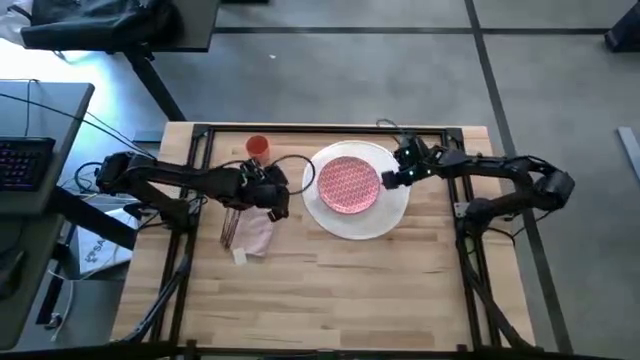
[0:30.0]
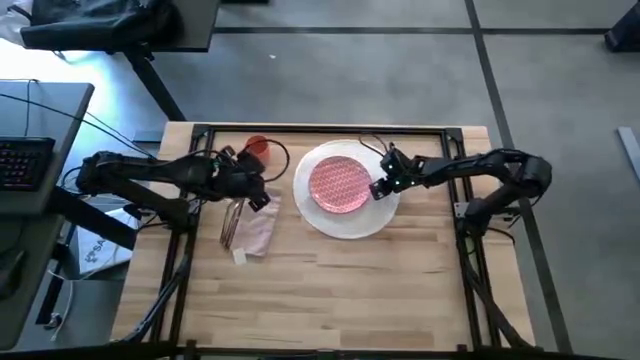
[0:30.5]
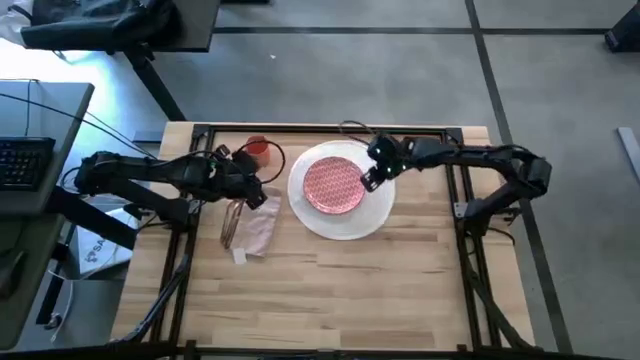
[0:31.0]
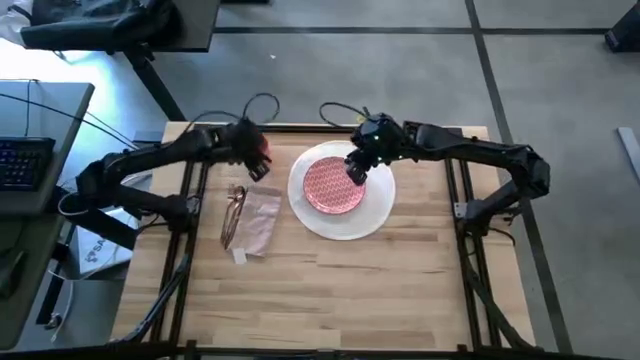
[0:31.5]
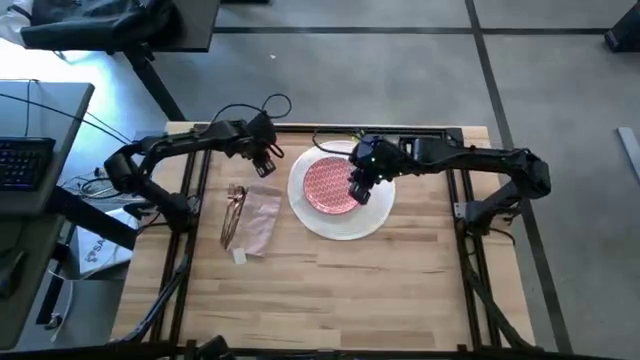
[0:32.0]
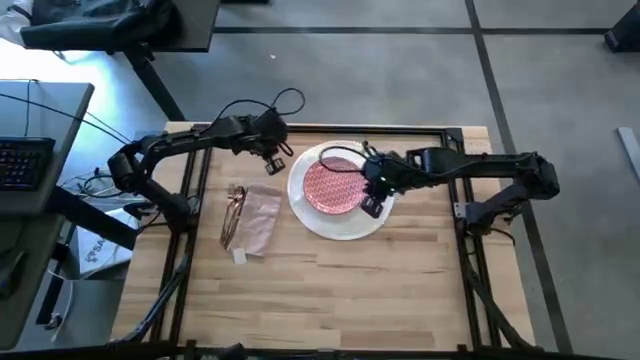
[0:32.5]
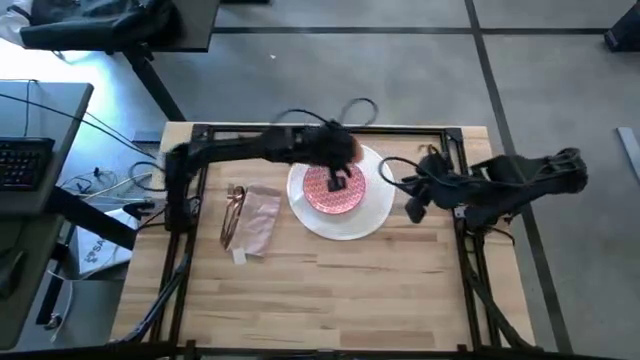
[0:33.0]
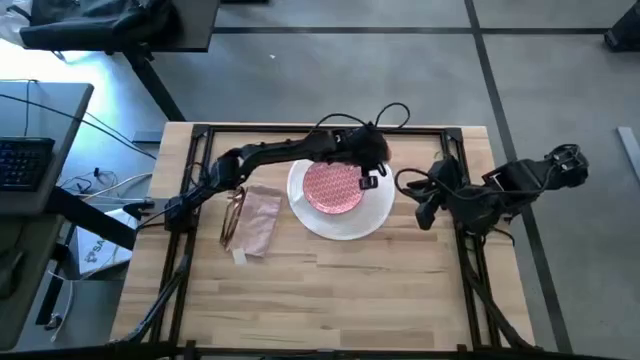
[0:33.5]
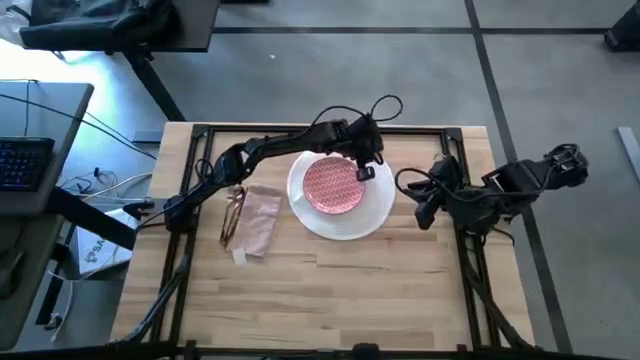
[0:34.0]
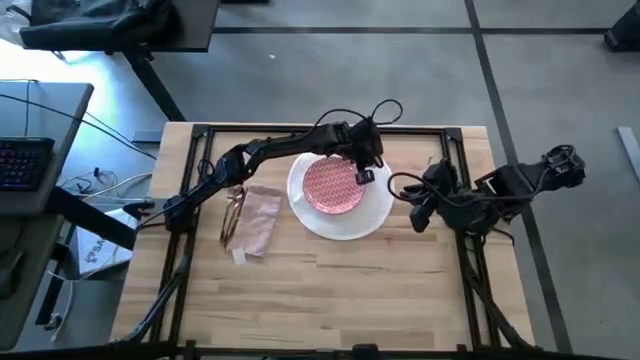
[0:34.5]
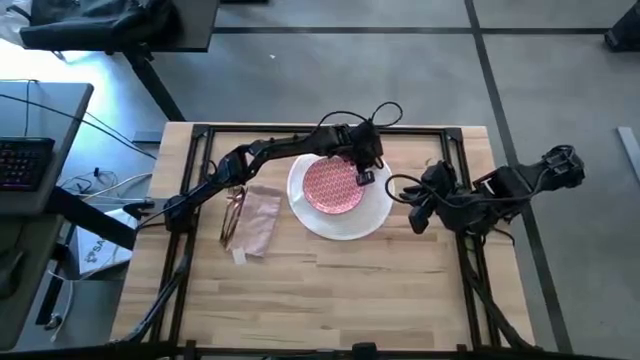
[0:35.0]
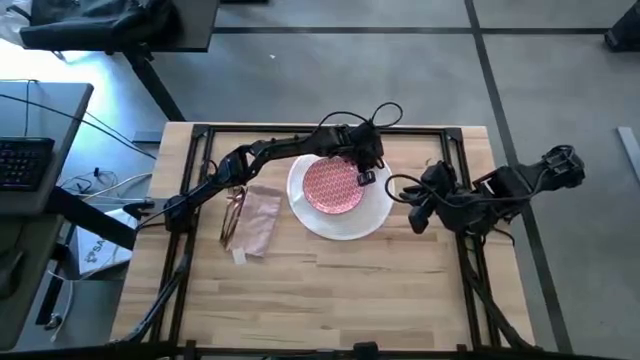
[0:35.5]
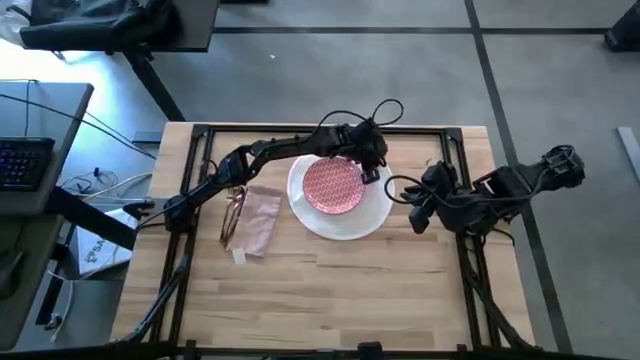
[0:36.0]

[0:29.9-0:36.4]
Task: Set table place
Put the cup onto the placemat

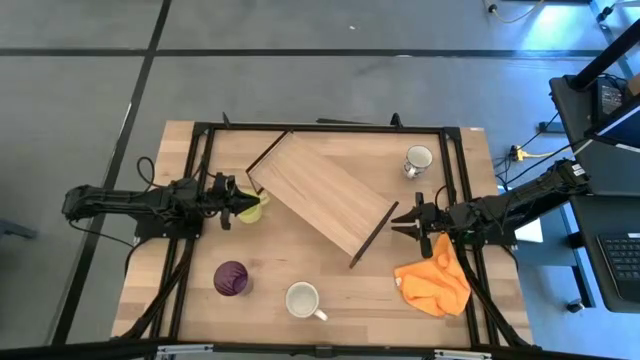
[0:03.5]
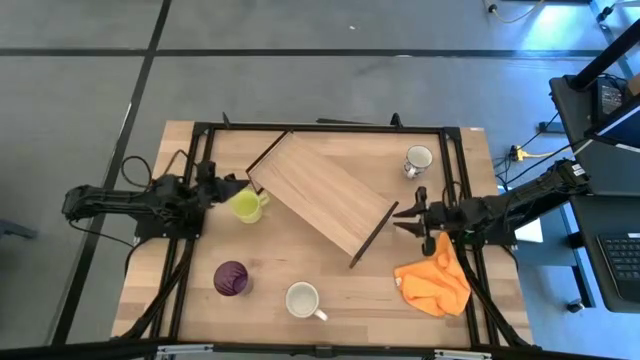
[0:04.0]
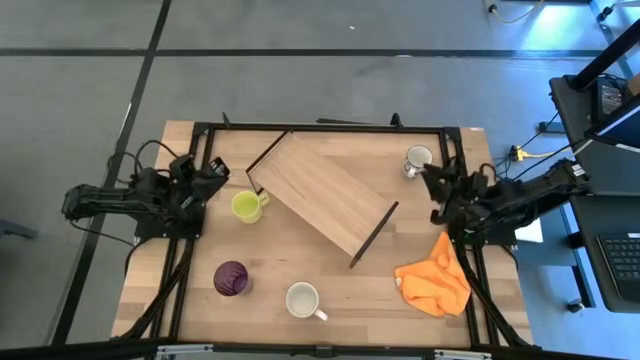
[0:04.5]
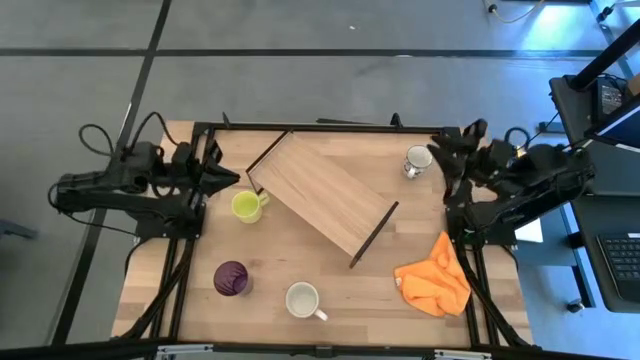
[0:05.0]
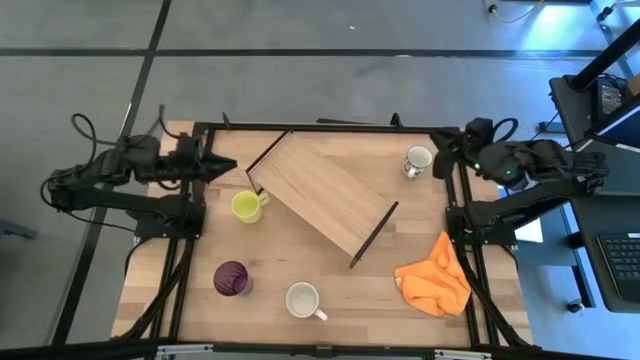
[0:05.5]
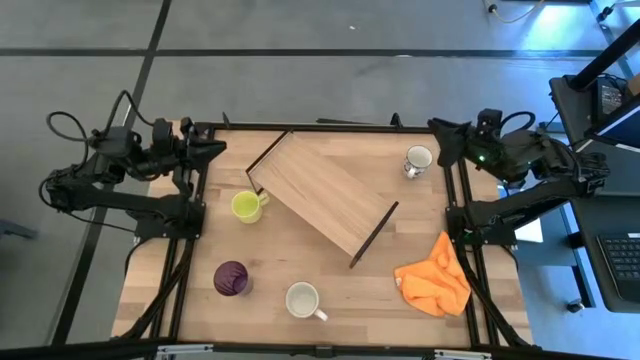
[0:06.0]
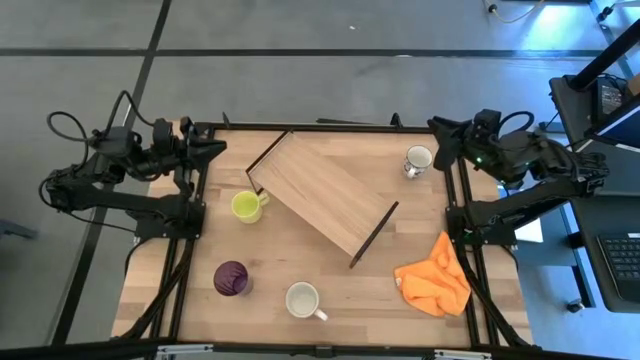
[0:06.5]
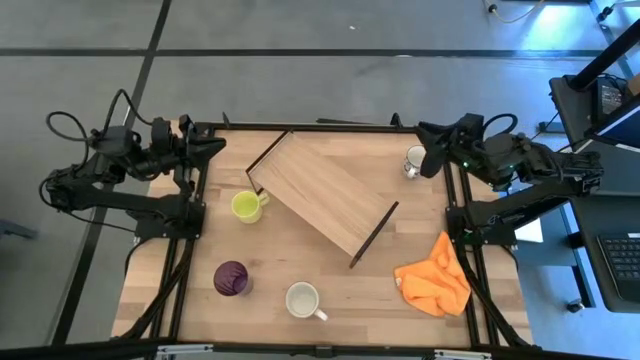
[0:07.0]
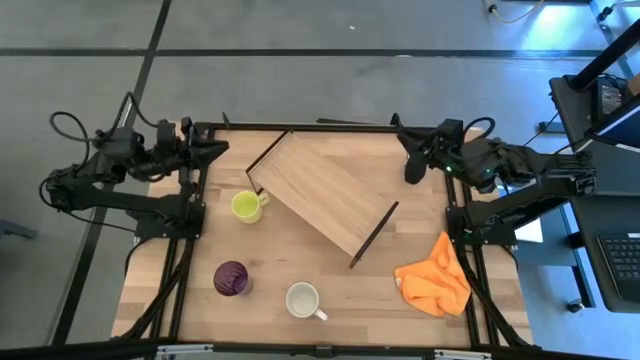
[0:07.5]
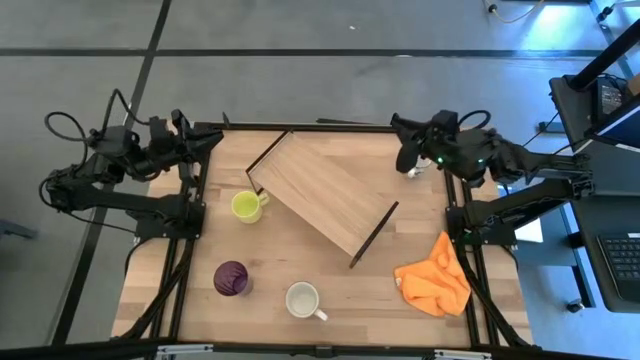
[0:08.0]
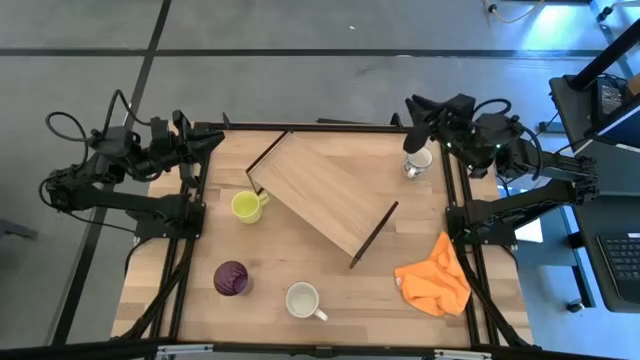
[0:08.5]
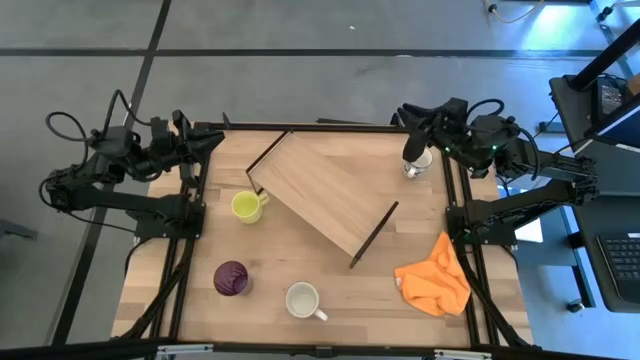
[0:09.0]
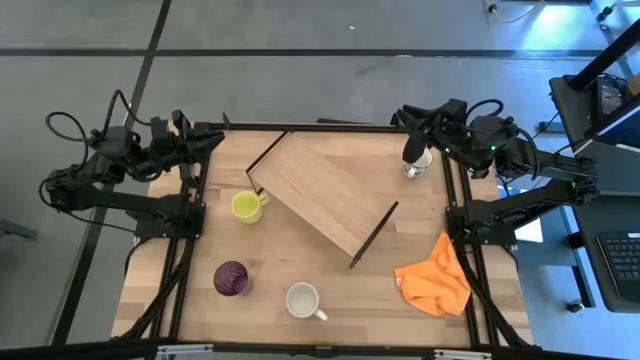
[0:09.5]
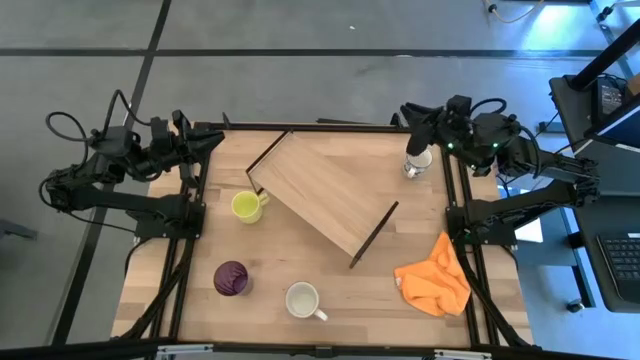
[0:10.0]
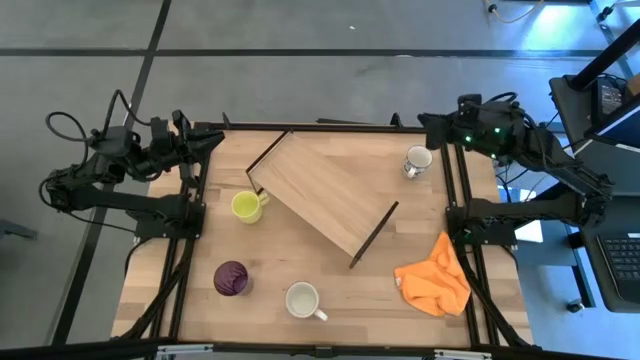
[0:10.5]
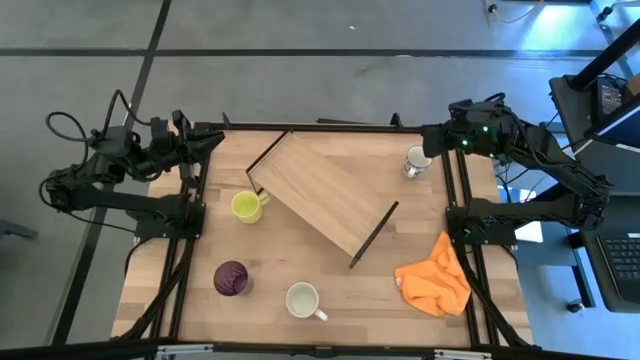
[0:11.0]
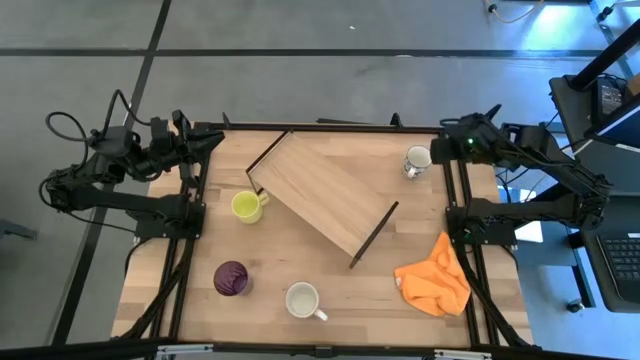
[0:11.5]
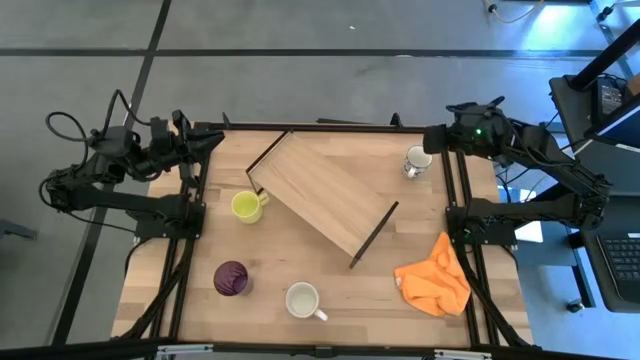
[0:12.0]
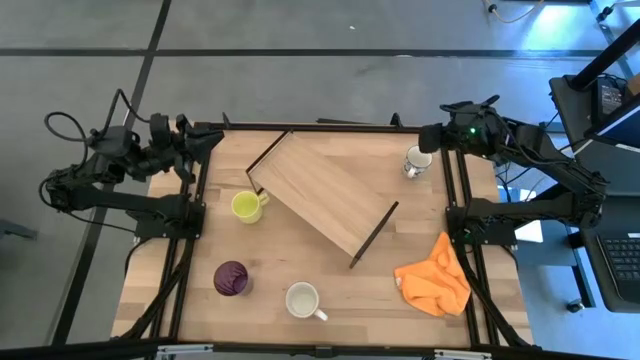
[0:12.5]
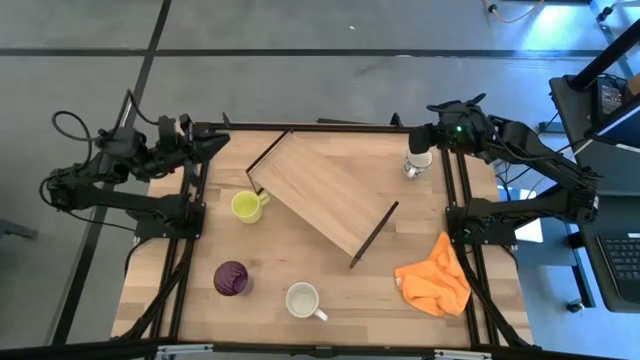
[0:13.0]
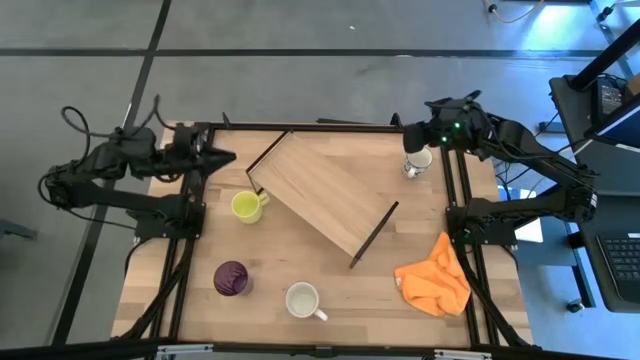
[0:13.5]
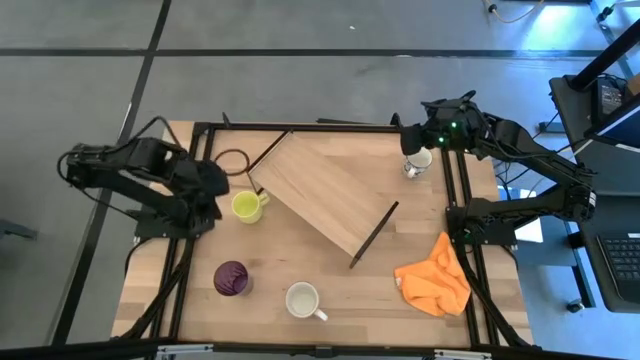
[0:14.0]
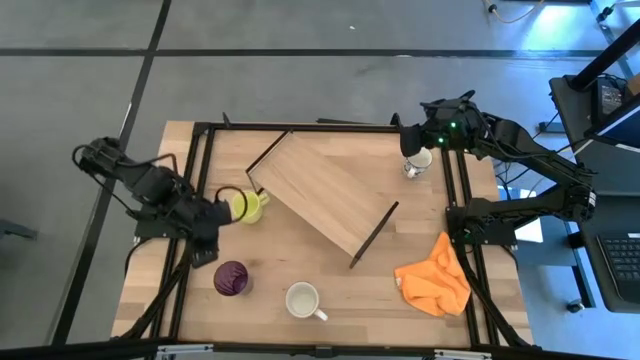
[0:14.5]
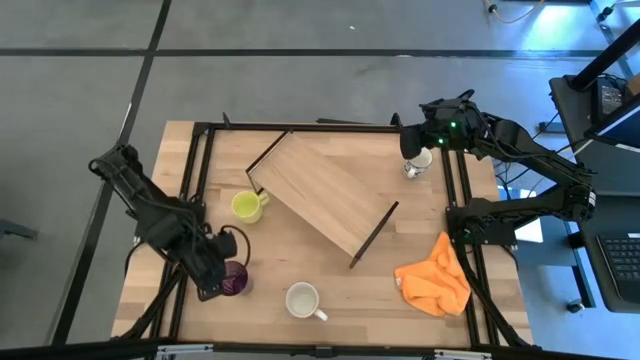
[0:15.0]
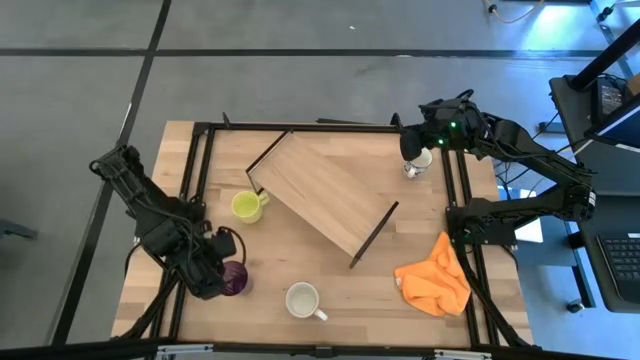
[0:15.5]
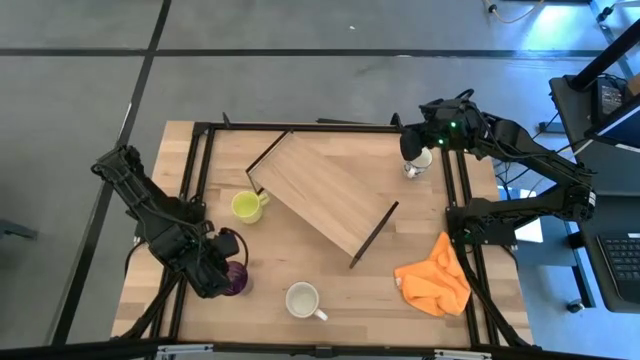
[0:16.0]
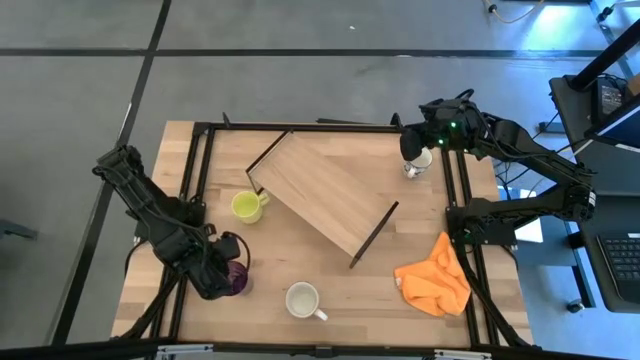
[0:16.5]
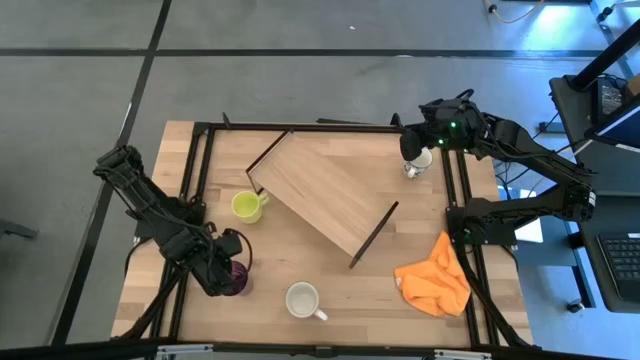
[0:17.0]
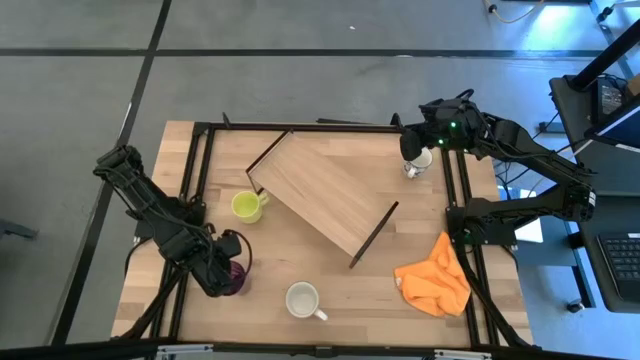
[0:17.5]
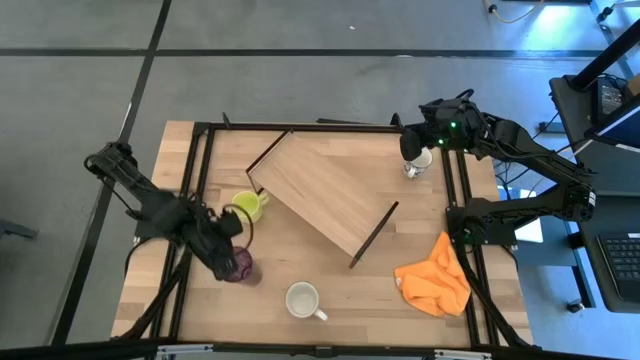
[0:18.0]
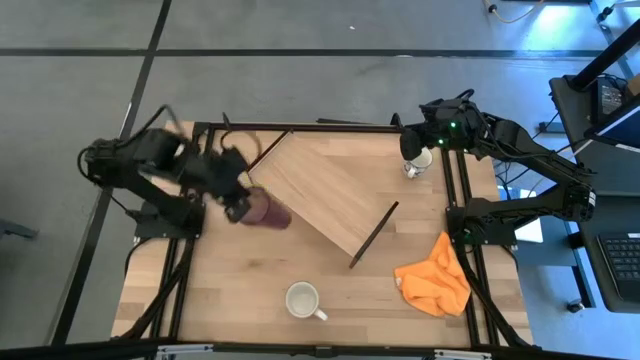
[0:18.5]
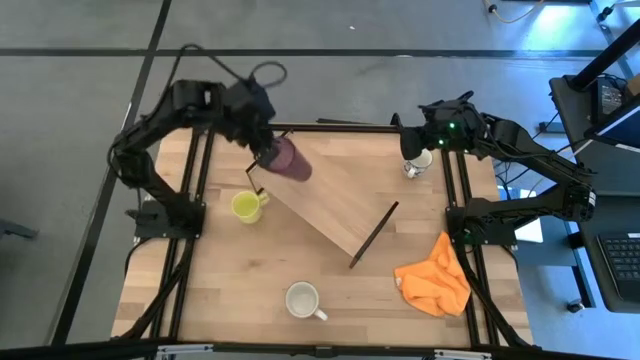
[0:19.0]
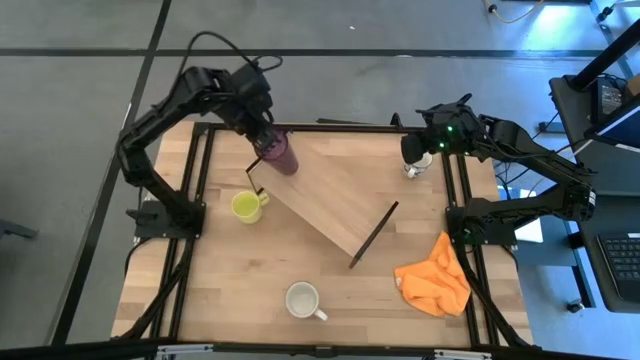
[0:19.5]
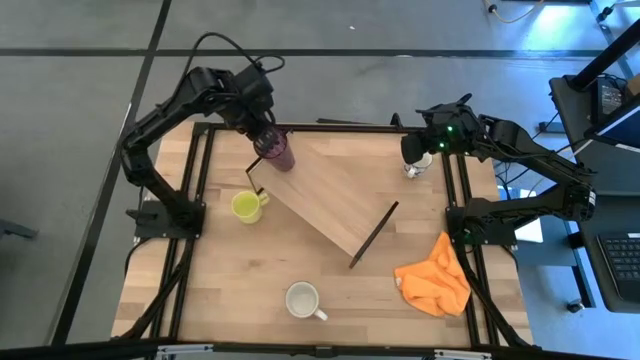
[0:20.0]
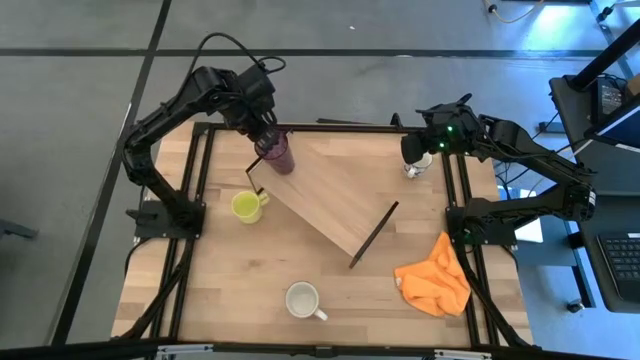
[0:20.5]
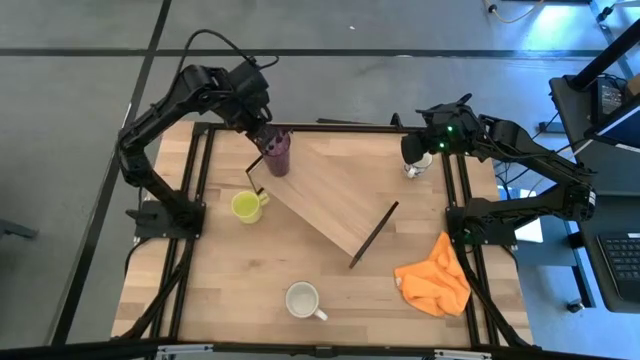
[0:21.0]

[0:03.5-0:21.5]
Task: Stack small to large cups/mugs on shelf
Put the violet glass on the shelf
